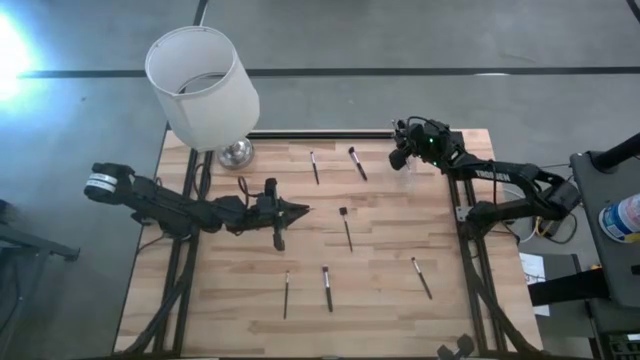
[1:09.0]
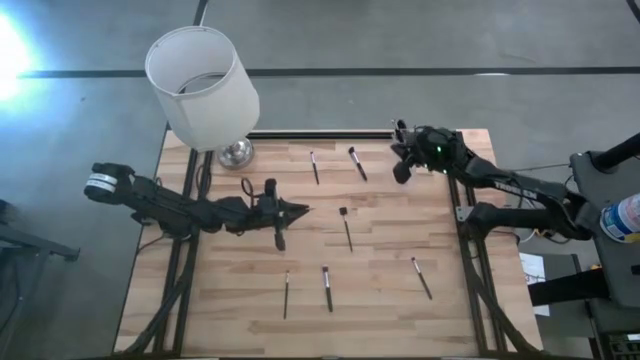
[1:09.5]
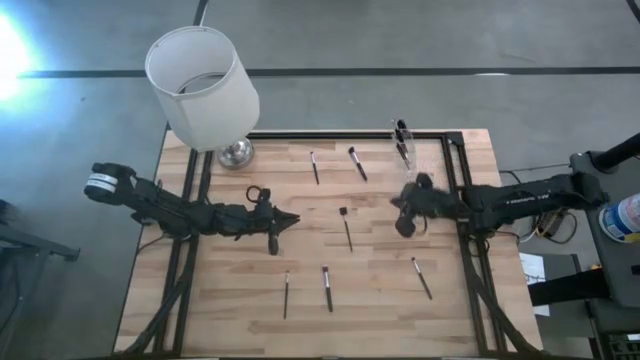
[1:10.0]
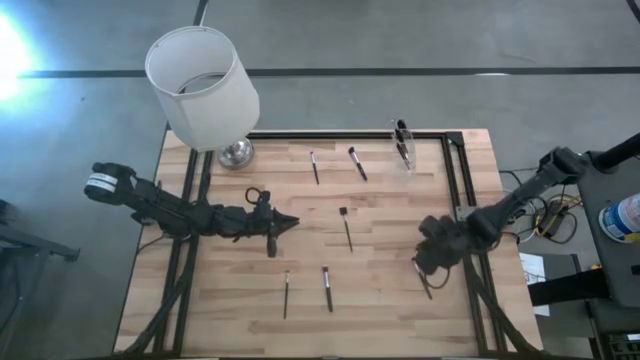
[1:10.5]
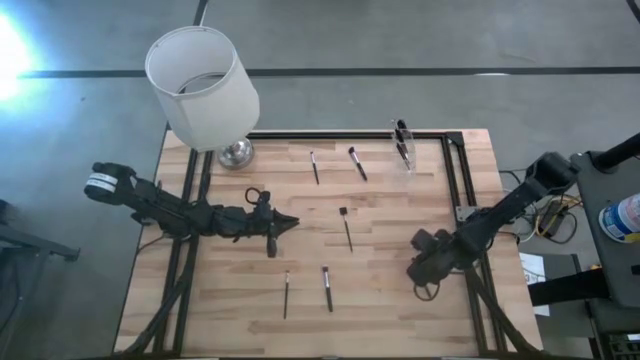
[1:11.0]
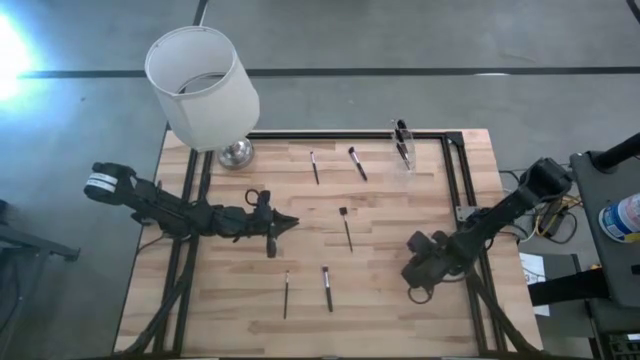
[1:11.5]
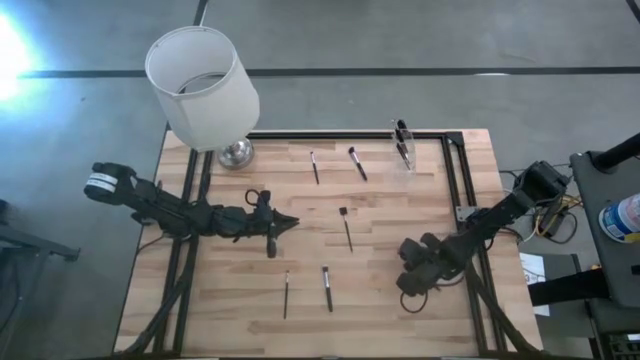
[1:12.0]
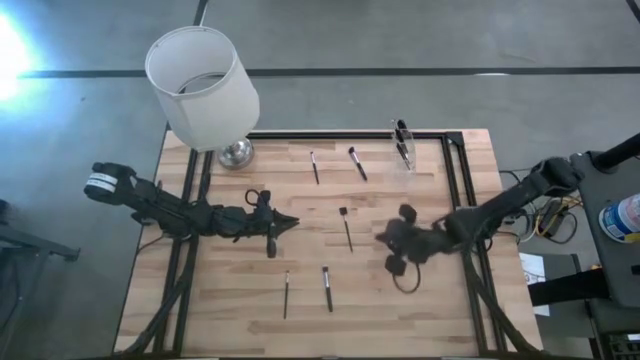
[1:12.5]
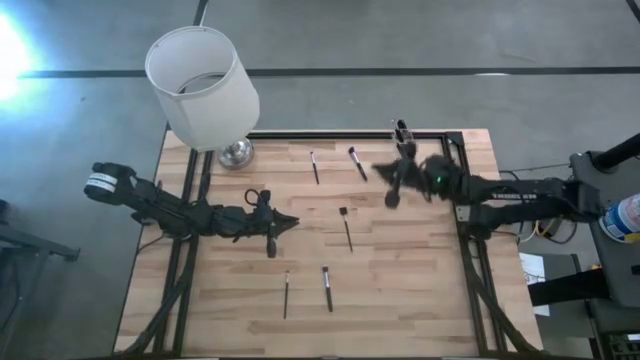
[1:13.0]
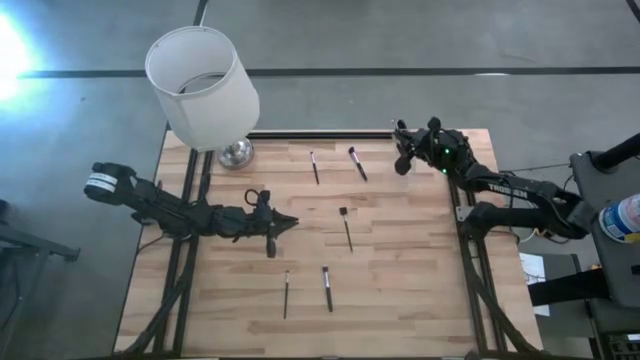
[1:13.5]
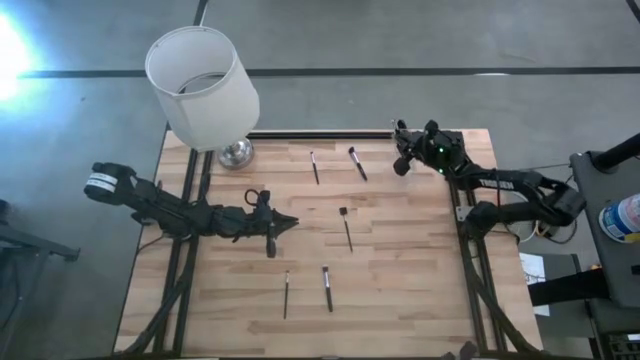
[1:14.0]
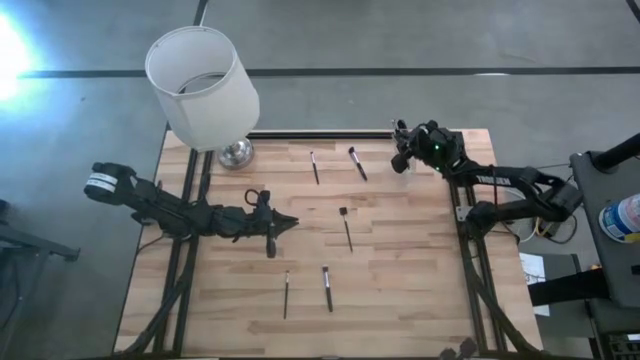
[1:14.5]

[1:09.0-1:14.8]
Task: Put items in baskets/containers
Put the foundation brush into the transparent organizer

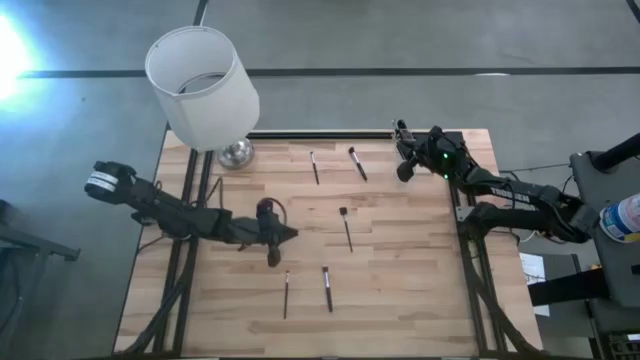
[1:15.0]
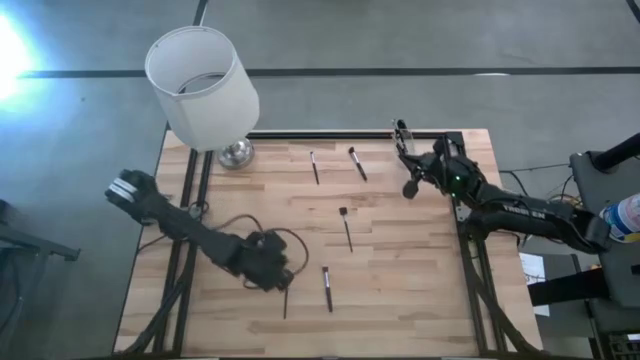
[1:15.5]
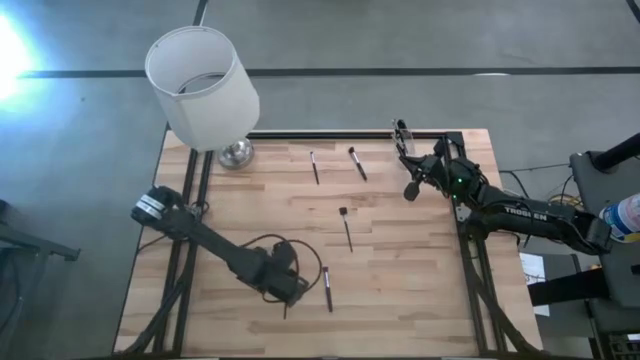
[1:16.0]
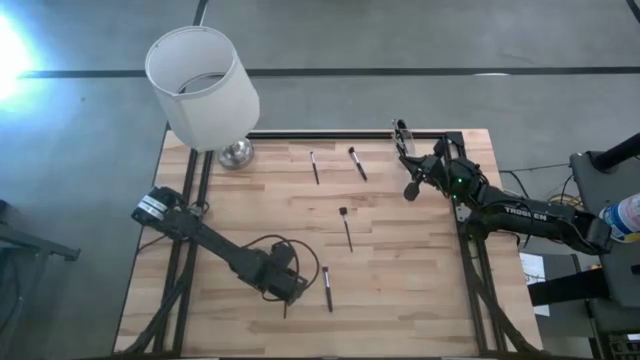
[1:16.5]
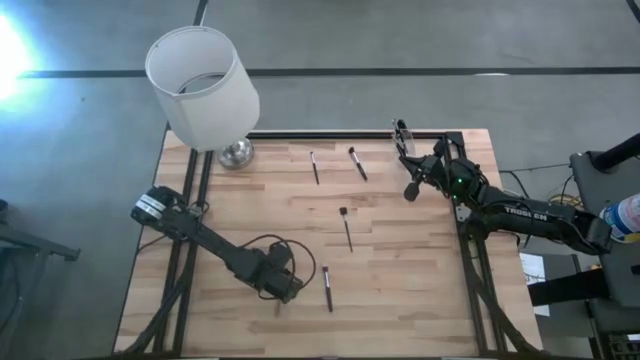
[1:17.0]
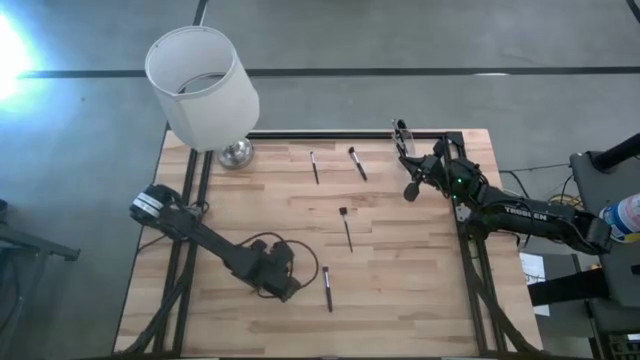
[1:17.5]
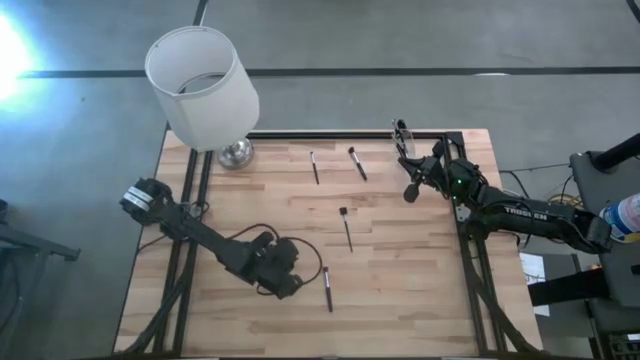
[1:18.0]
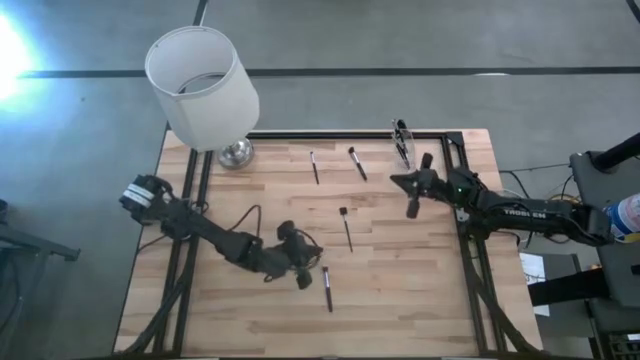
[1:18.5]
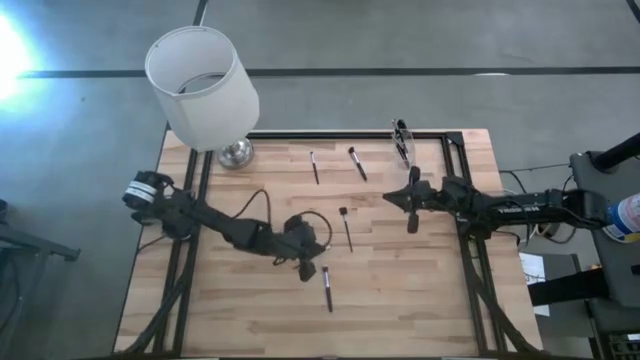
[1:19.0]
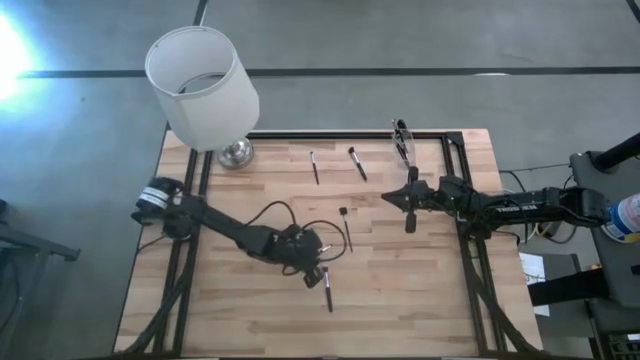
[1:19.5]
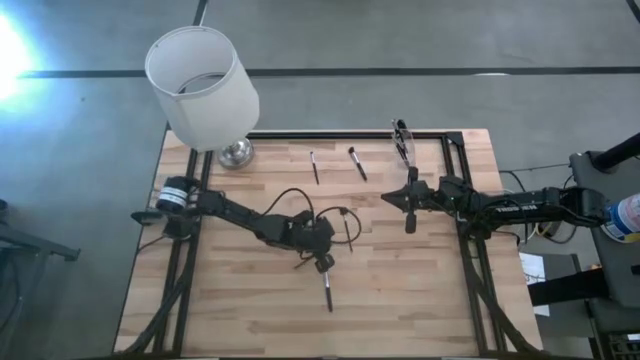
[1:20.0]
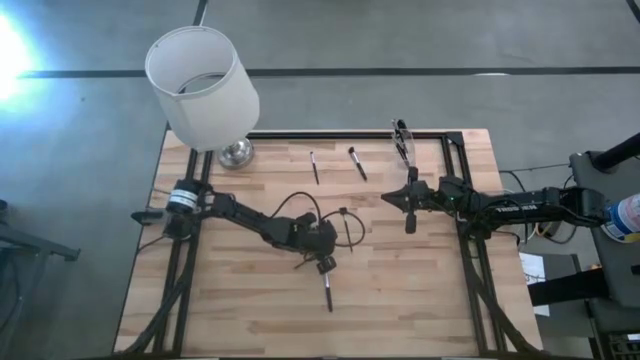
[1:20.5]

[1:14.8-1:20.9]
Put the eyeshadow brush into the transparent organizer

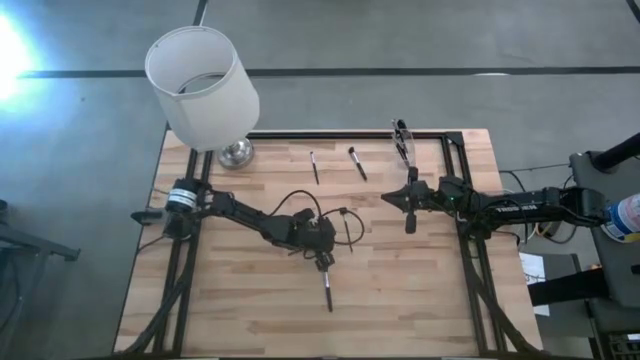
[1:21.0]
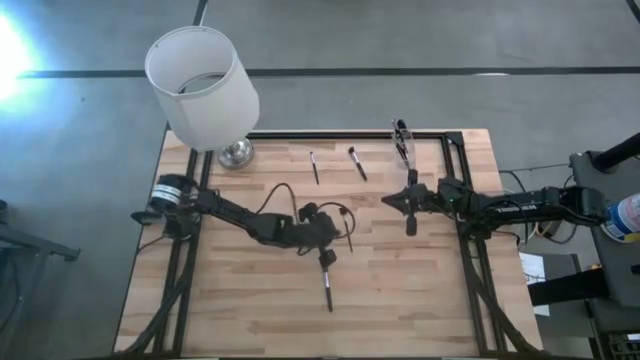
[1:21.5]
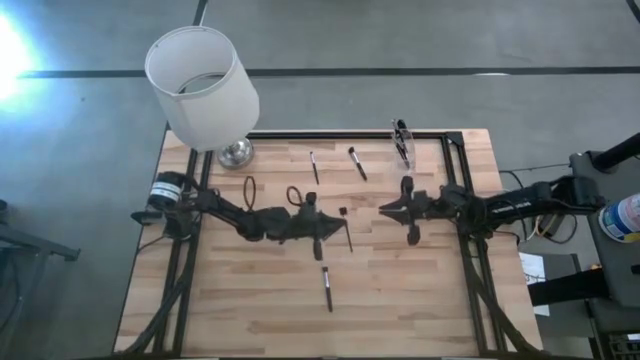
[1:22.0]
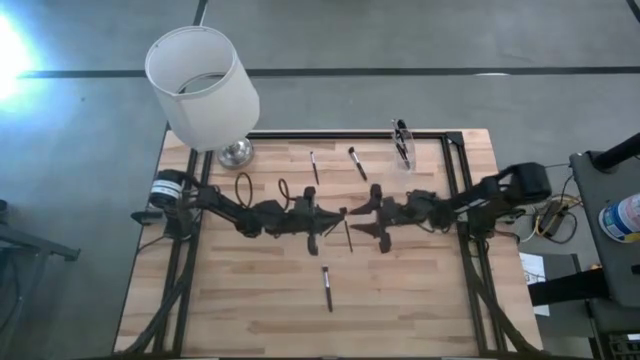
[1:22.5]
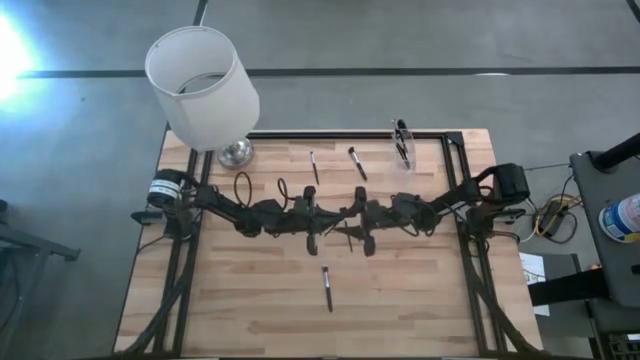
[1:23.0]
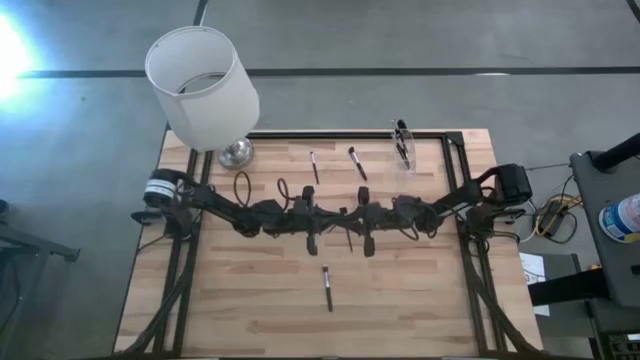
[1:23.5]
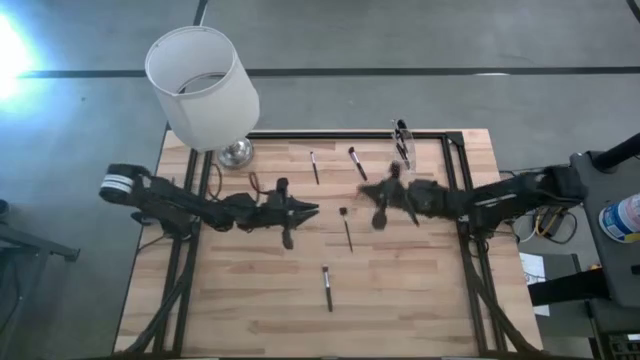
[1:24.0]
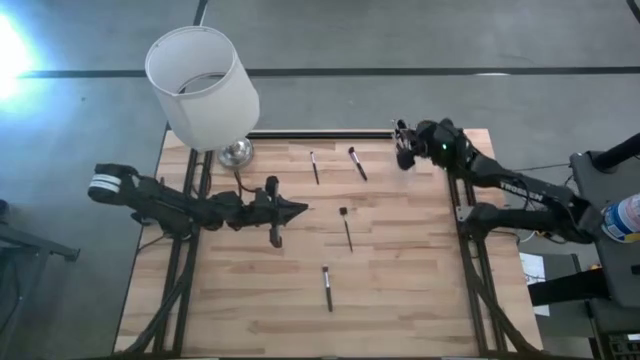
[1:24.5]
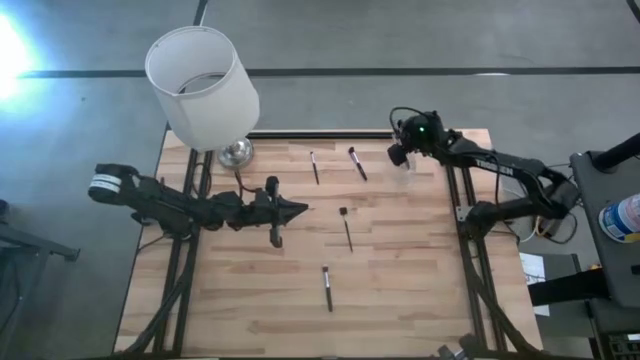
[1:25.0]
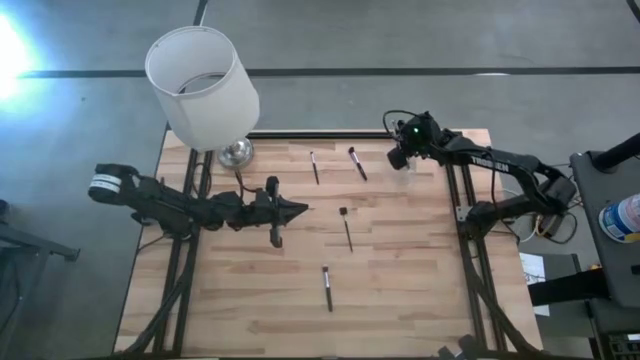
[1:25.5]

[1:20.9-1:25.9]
Put the eyeshadow brush into the transparent organizer

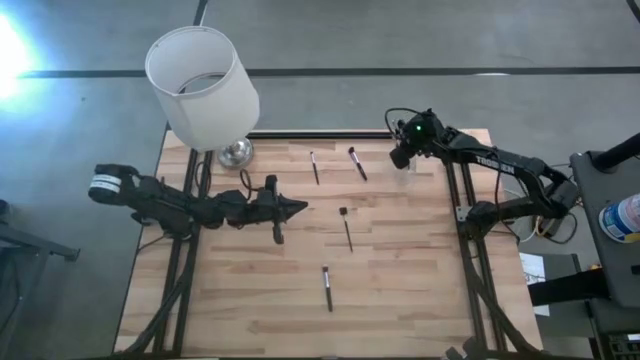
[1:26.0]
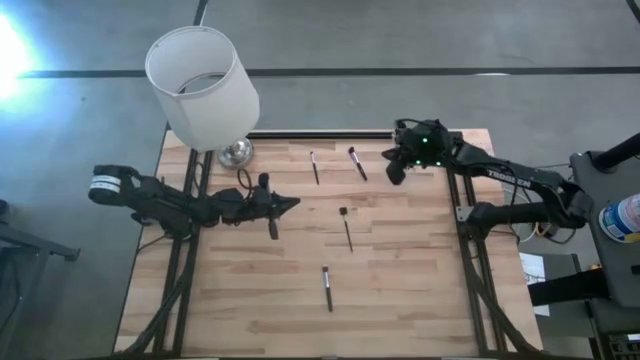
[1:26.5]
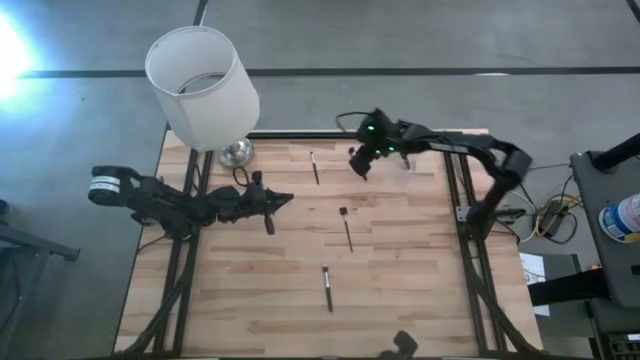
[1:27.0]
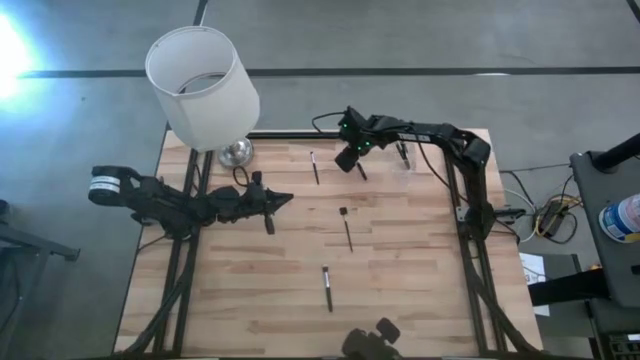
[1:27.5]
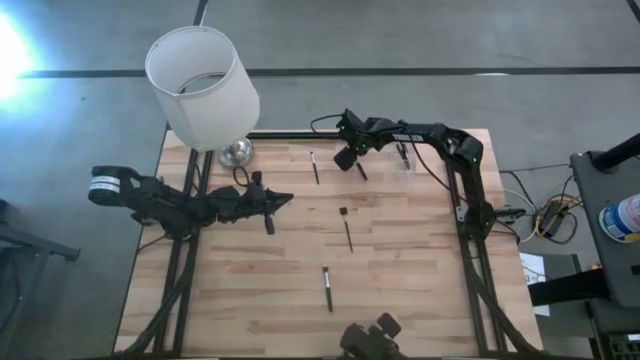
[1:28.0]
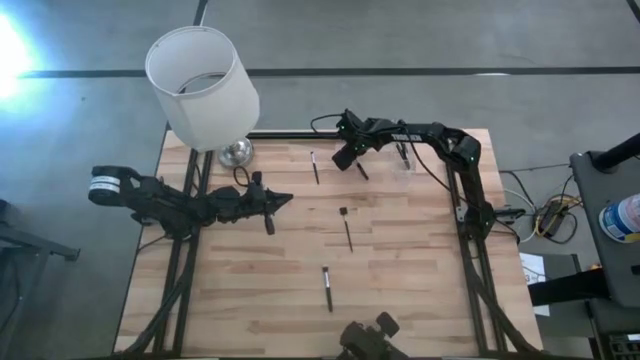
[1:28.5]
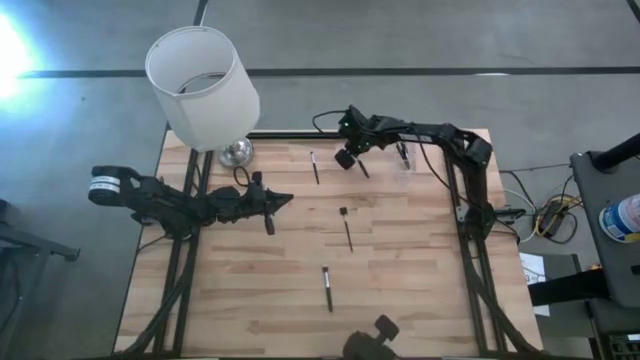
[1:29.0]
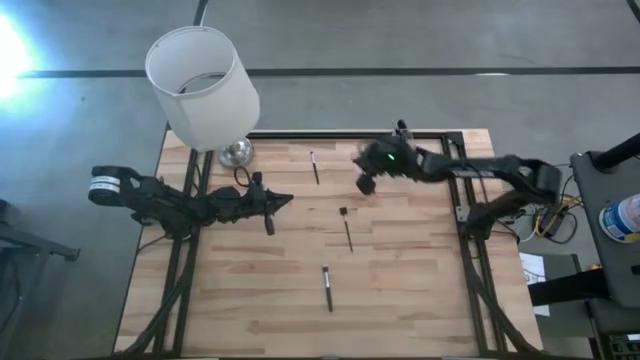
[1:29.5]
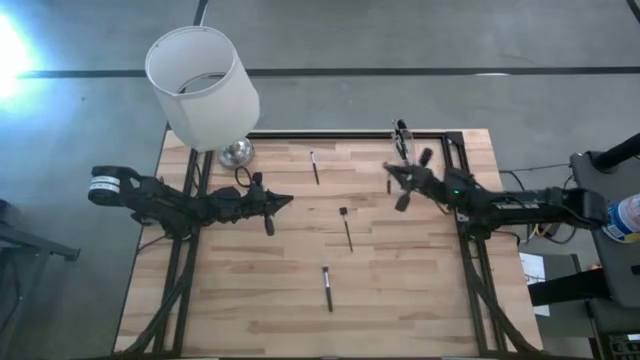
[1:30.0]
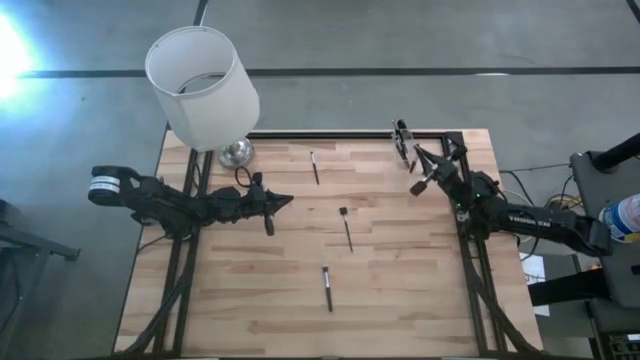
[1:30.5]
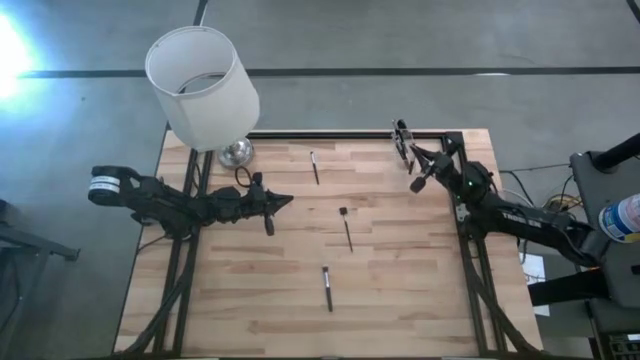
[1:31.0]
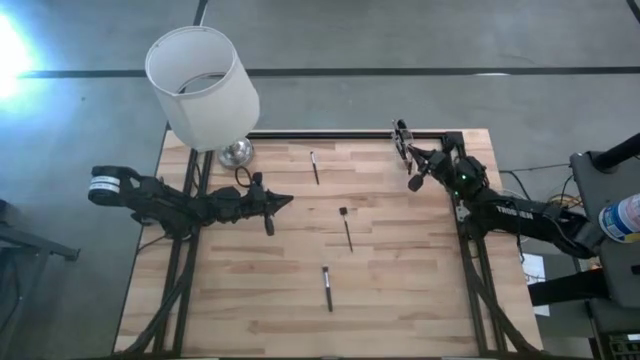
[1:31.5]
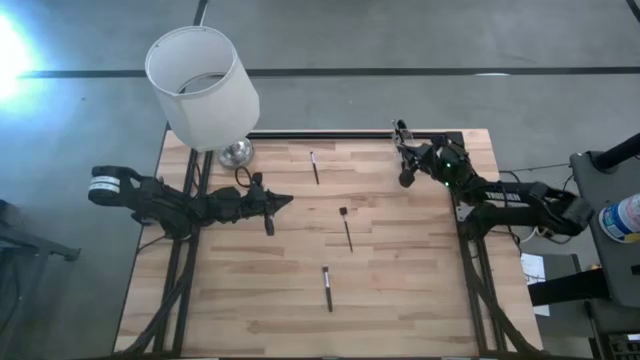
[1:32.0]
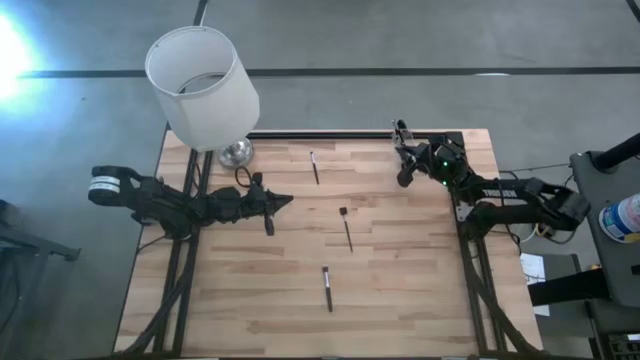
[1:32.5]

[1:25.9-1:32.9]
Put the foundation brush into the transparent organizer
